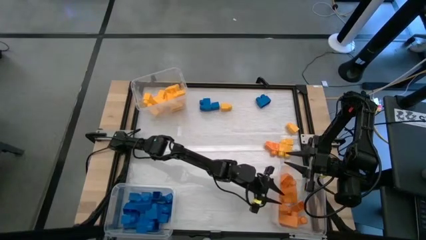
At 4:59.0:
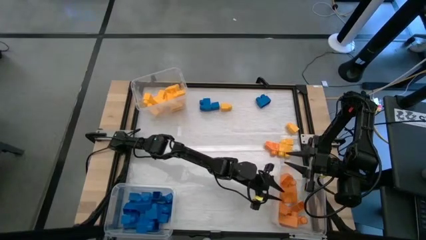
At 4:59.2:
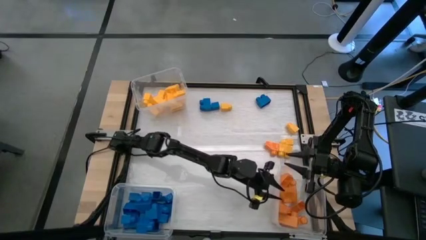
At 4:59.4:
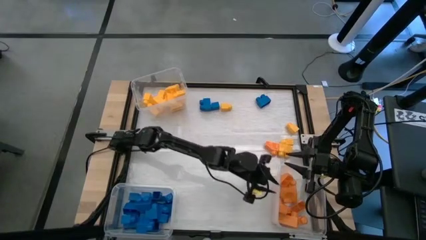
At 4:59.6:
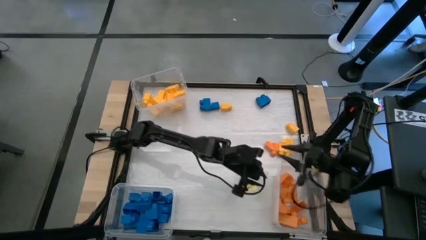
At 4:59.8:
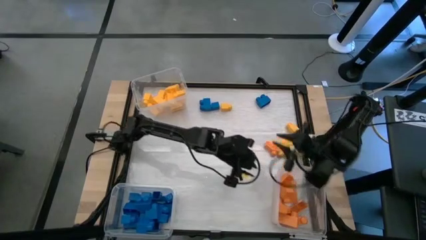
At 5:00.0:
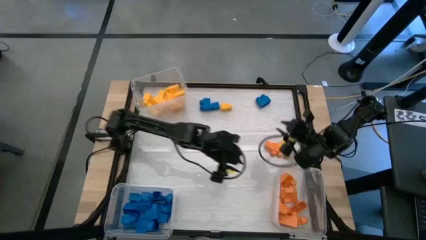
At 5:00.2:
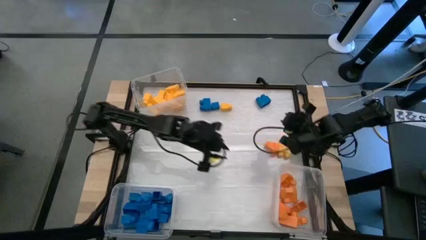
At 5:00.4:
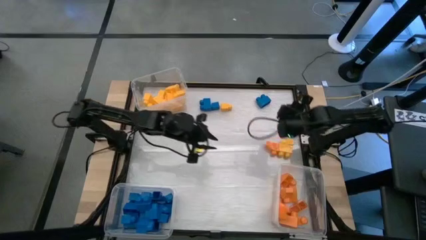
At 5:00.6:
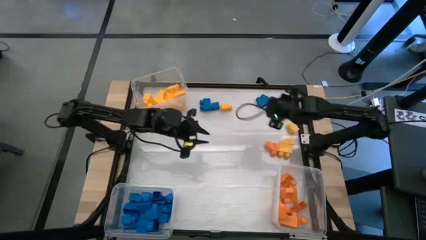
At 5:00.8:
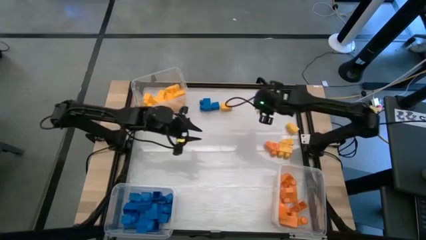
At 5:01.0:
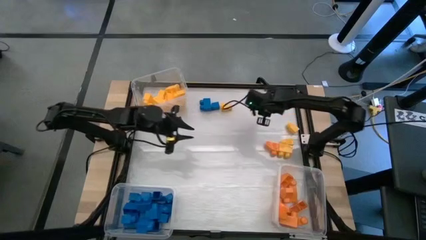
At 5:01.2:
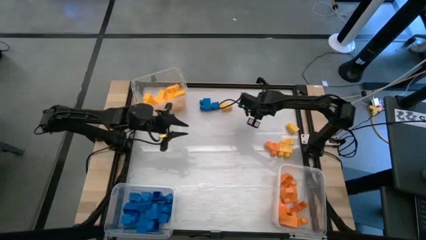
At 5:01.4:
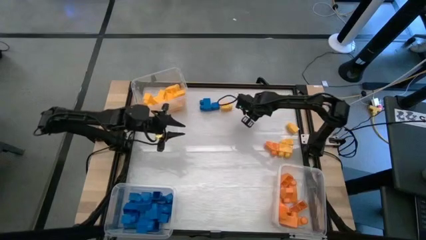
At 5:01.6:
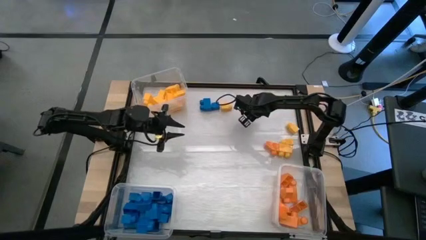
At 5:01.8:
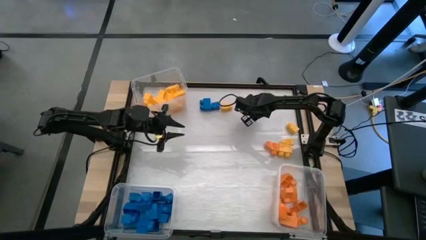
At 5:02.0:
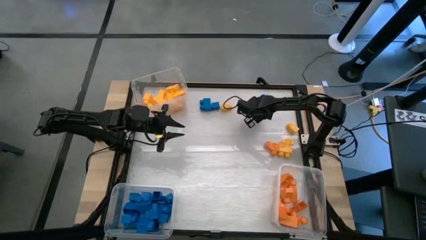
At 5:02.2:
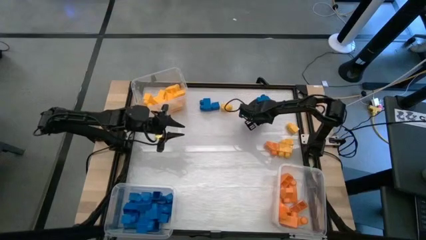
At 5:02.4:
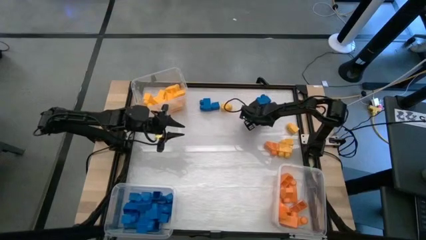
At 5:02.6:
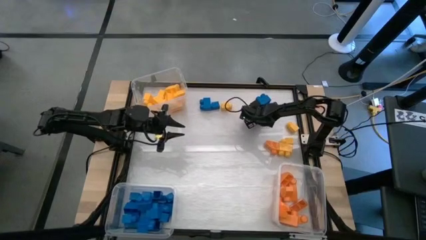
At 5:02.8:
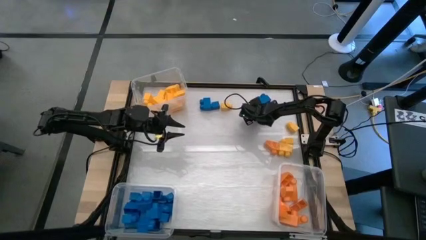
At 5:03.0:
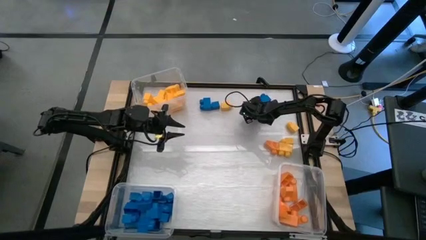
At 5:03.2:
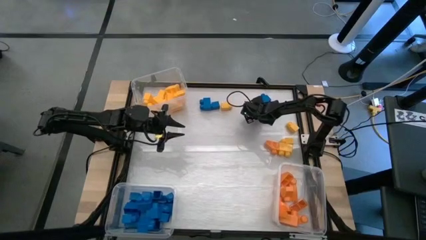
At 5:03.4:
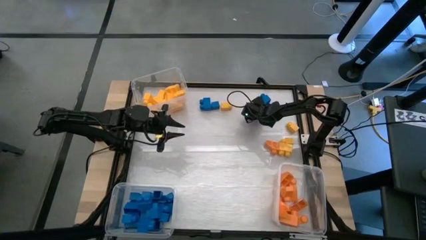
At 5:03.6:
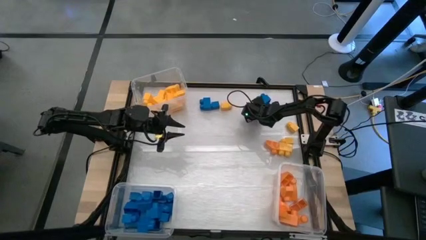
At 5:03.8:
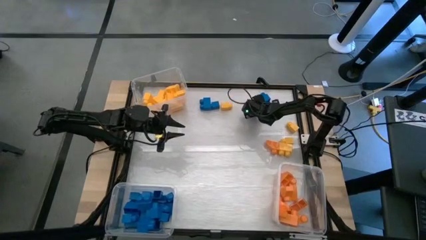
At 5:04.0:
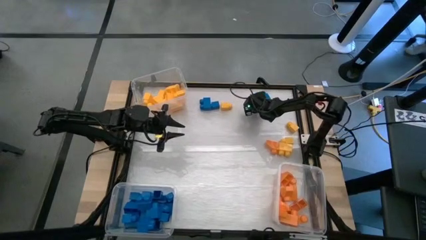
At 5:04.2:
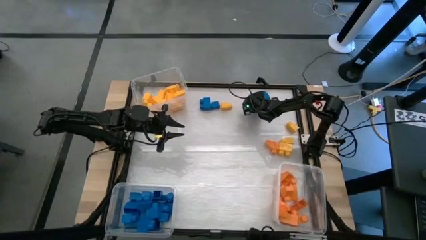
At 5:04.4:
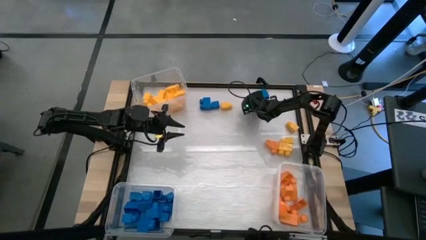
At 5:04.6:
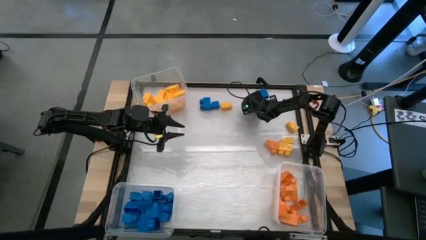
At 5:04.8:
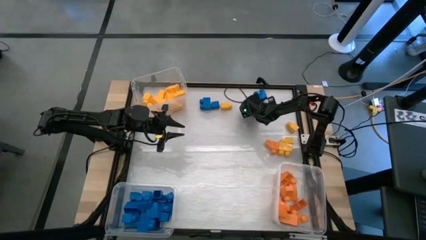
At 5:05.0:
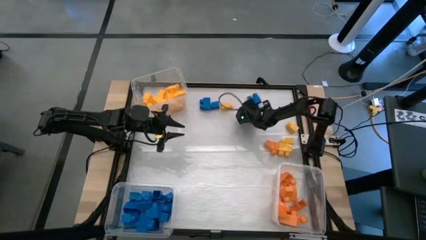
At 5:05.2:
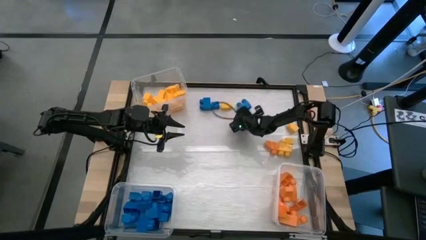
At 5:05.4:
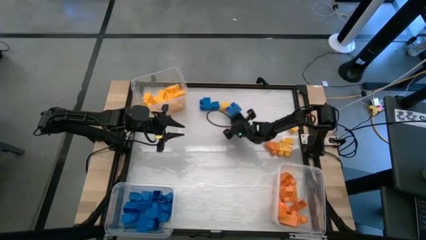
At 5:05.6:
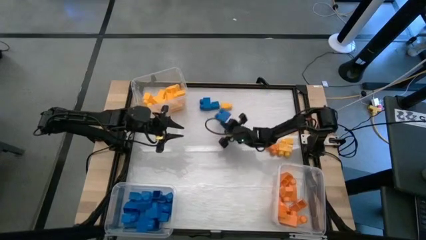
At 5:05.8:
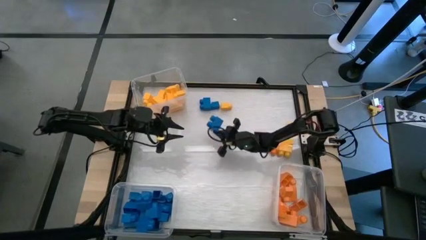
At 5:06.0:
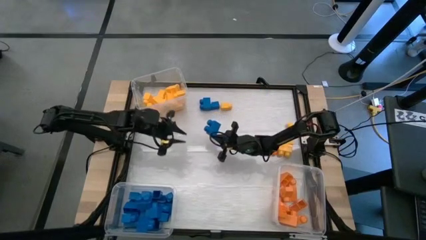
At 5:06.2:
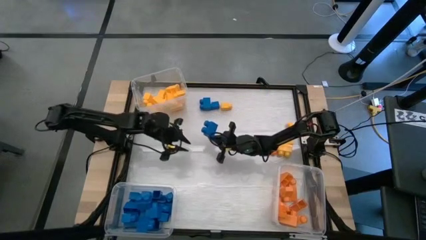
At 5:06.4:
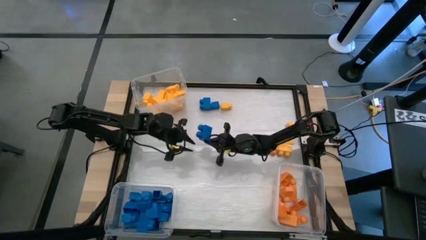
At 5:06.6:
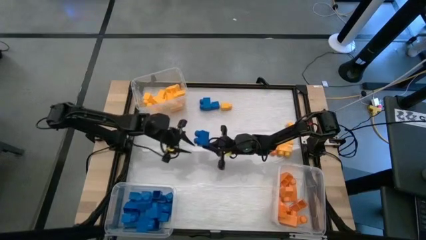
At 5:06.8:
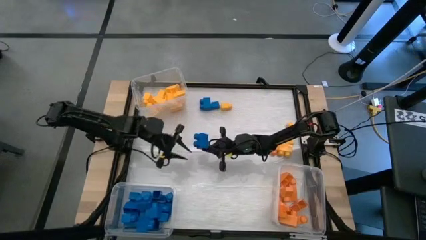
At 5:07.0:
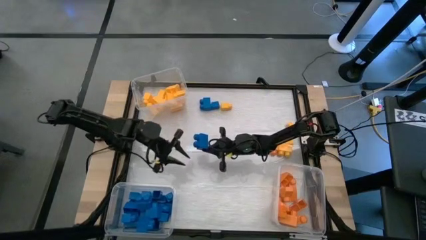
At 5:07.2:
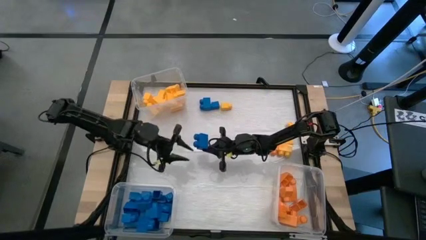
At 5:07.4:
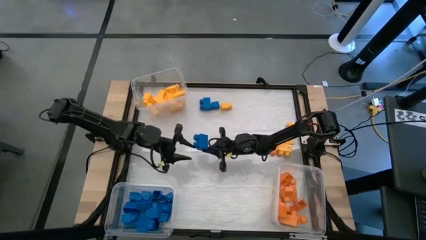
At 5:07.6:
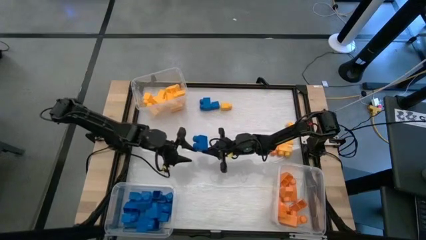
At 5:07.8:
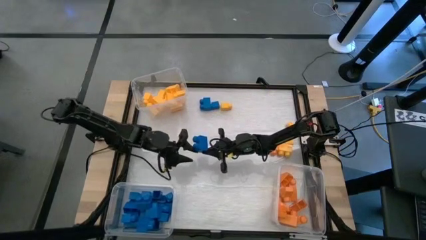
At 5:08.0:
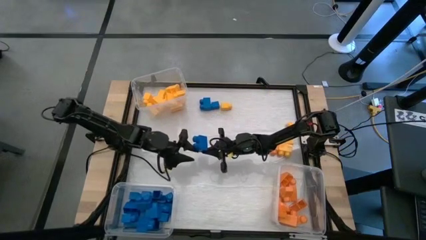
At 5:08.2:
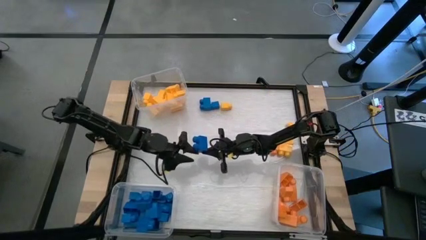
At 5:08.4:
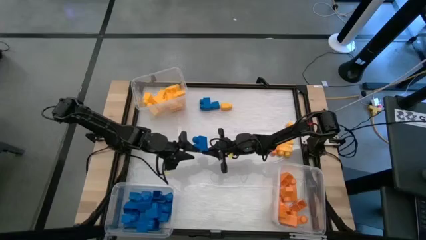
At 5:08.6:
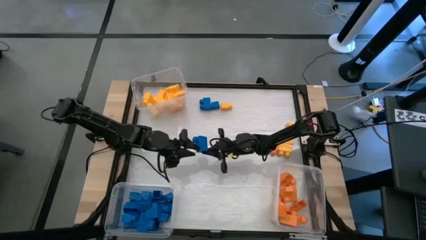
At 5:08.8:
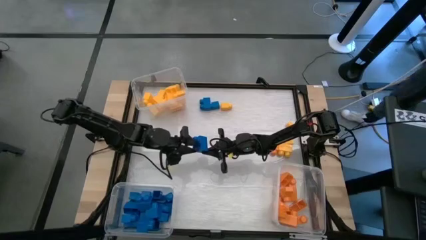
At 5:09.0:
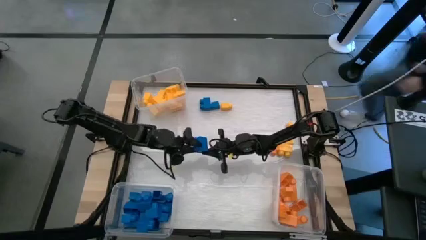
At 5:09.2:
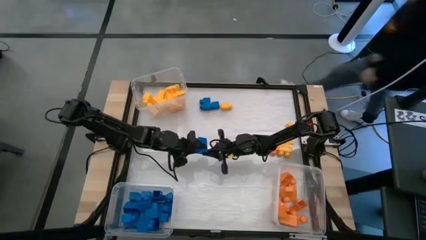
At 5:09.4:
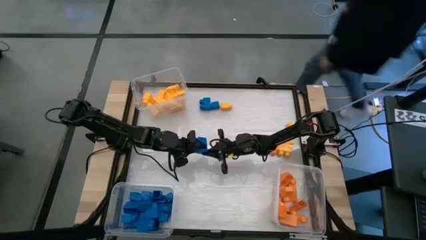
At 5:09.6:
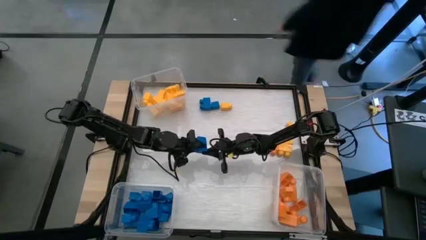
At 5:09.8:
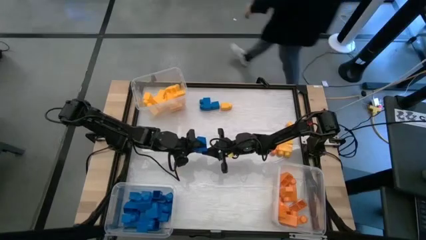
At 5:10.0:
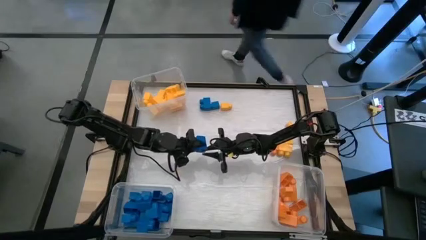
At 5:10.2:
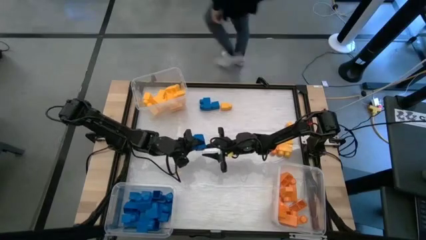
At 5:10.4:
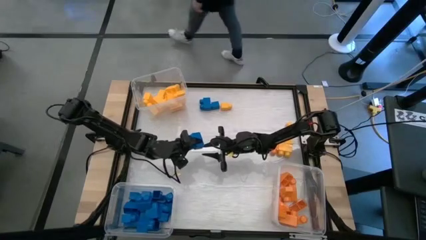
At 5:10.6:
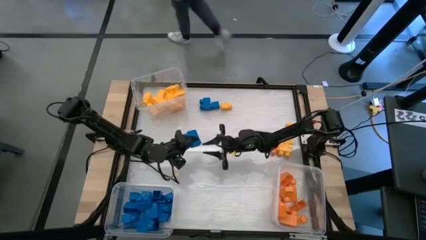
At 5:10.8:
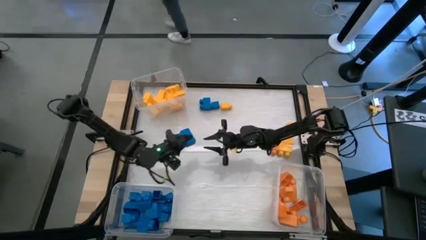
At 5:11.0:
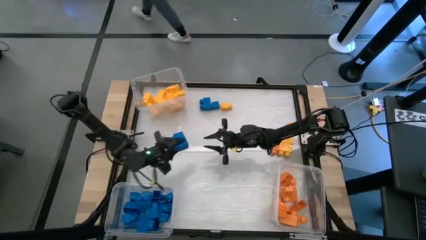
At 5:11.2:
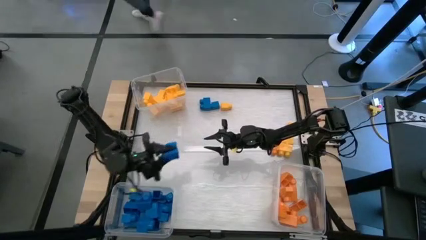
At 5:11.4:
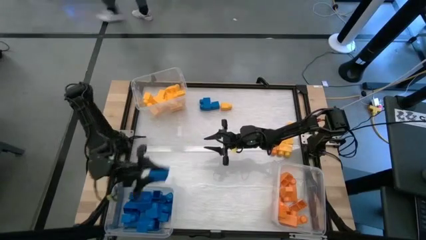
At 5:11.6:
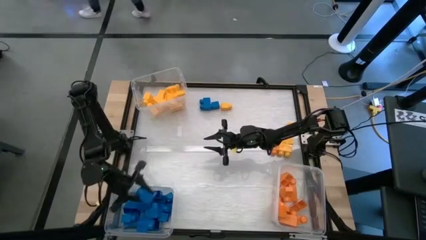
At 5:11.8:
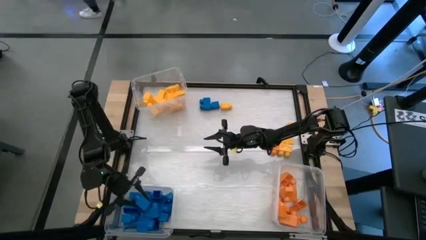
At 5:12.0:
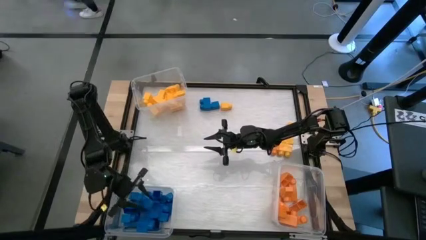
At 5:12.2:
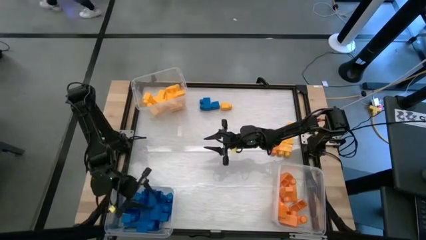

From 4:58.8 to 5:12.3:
Task: Sort blocks
Put the blue game piece into the bottom left transparent bin

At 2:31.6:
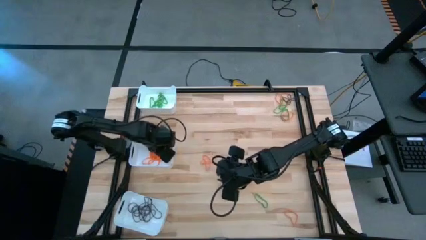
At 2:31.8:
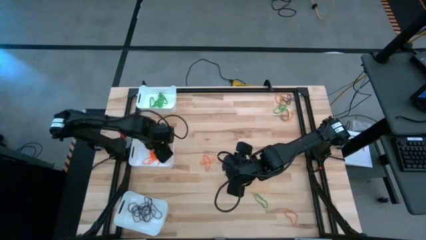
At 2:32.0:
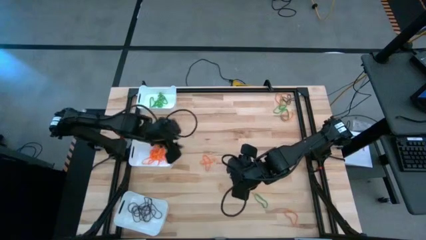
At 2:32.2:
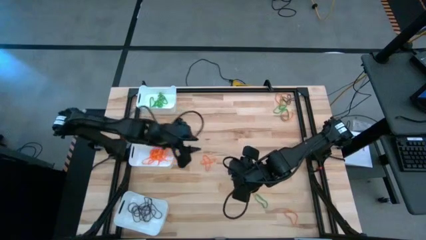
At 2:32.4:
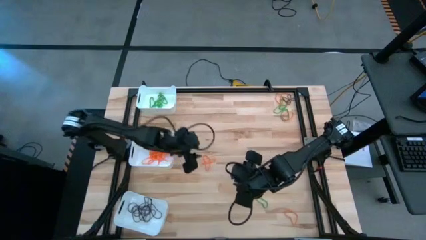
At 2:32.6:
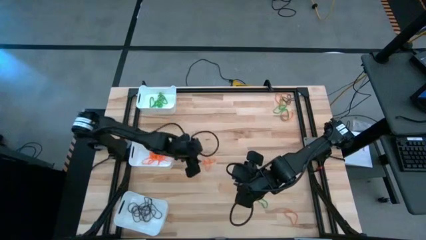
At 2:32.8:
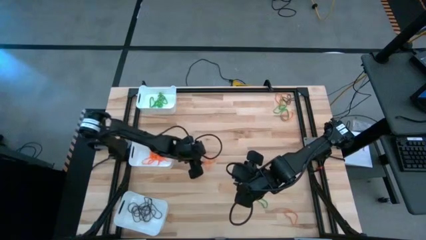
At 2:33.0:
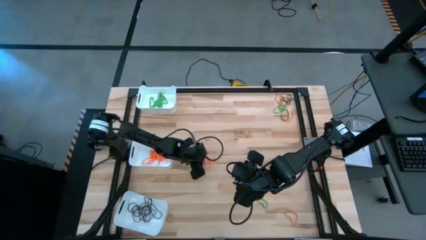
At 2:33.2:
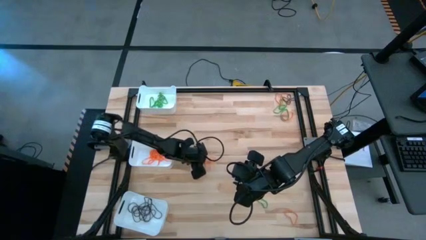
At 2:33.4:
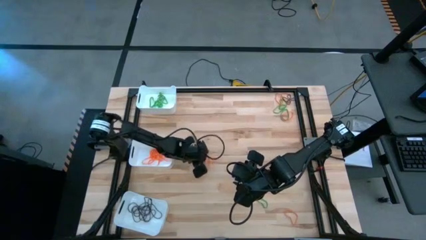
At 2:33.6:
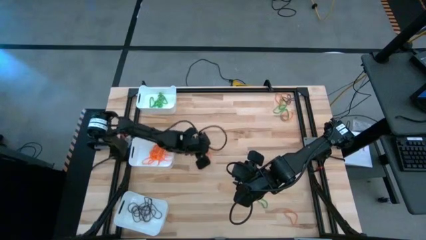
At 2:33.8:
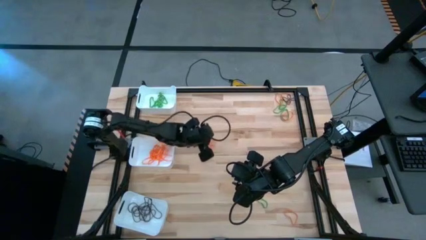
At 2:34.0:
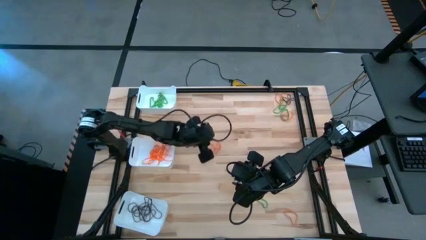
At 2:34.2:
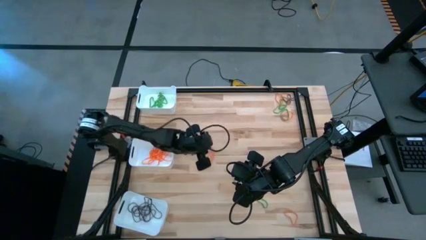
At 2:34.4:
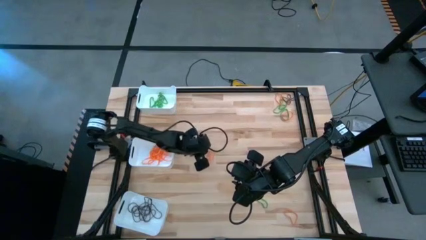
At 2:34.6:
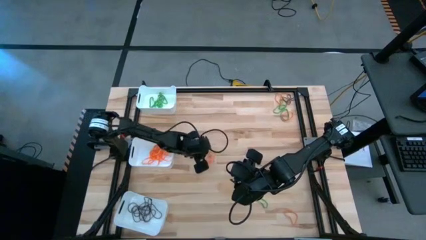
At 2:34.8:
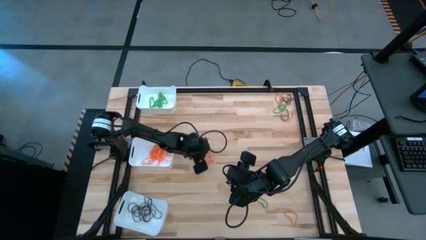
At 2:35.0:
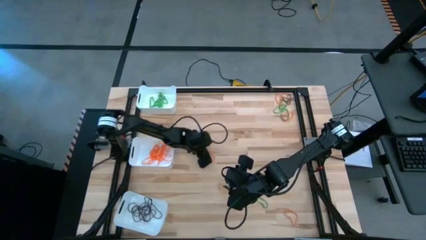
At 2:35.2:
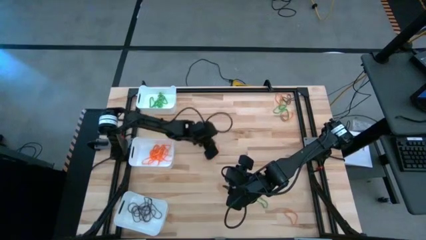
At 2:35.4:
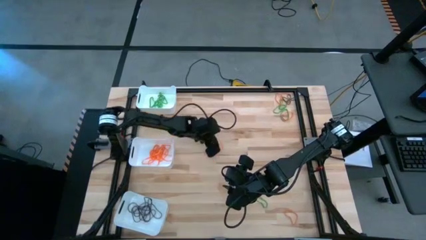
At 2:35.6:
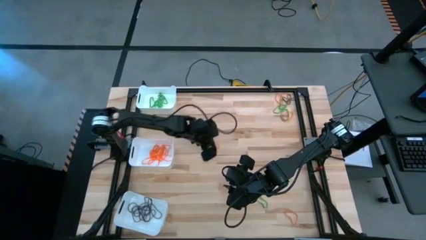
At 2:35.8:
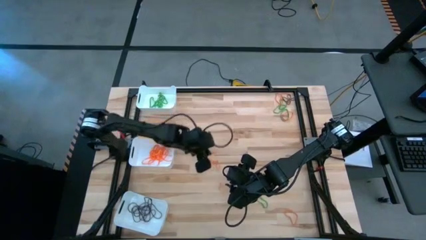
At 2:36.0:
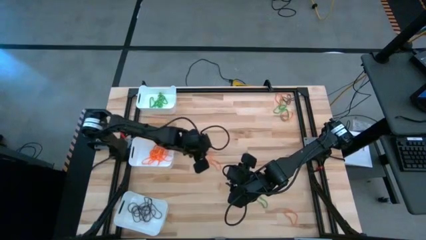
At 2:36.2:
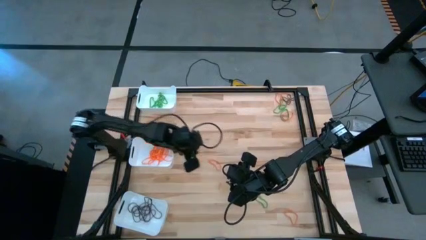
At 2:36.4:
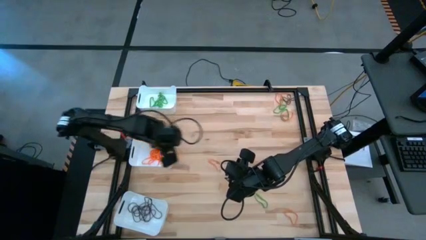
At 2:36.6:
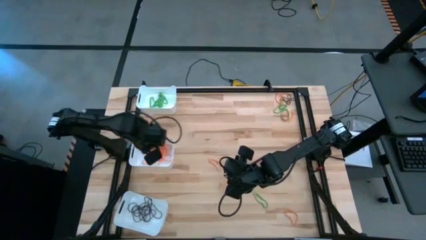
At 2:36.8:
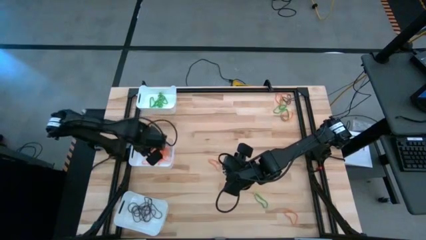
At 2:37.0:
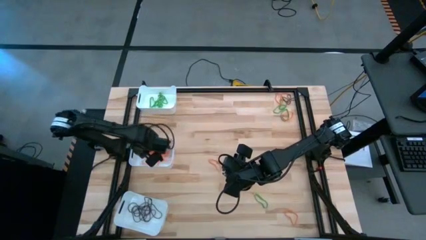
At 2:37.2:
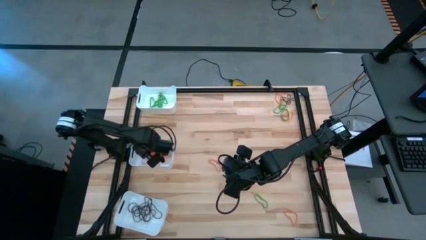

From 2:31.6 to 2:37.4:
Task: Sort rubber bands into baskets
Put the orange rubber band into the middle white bin
